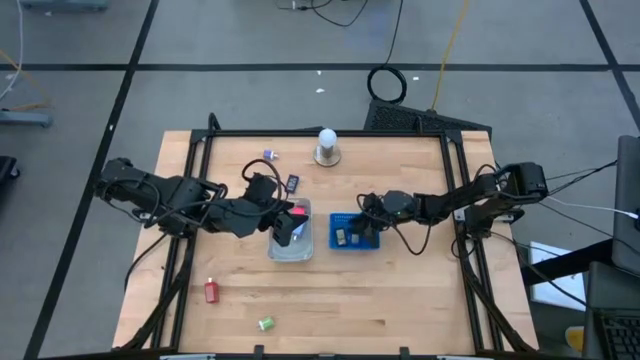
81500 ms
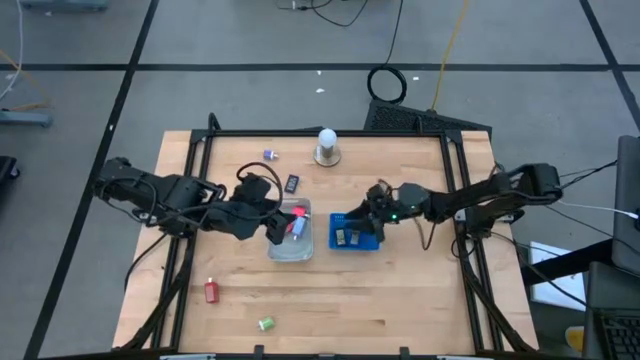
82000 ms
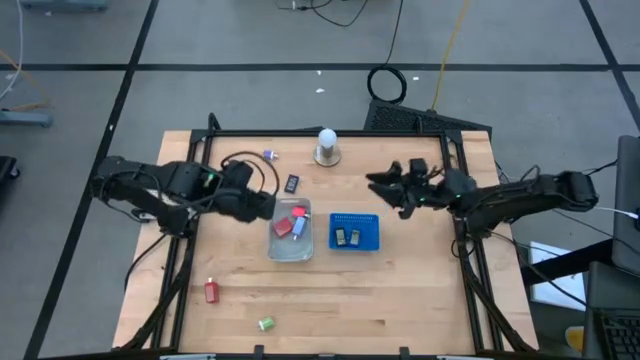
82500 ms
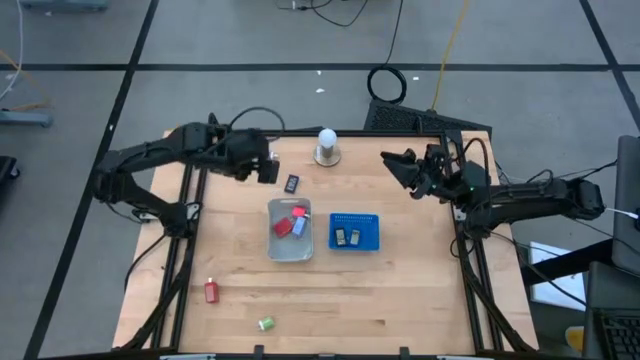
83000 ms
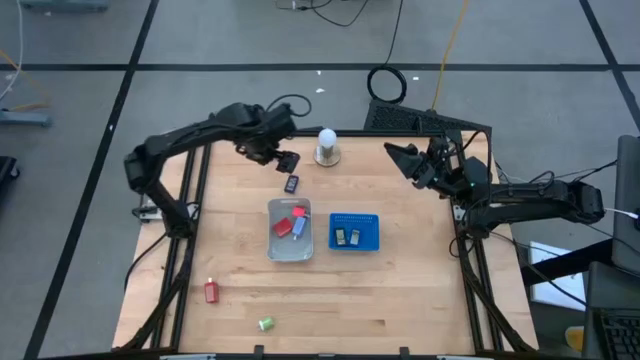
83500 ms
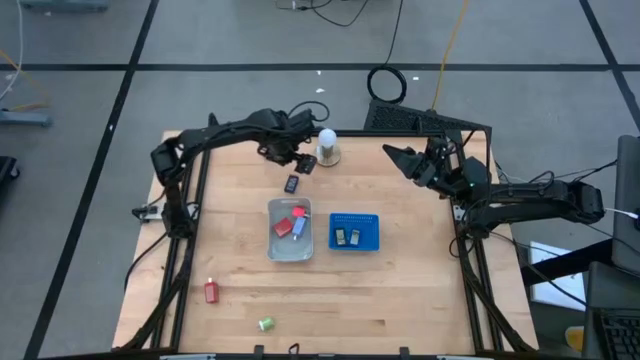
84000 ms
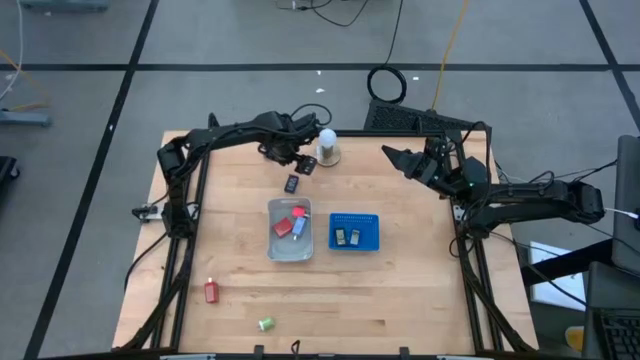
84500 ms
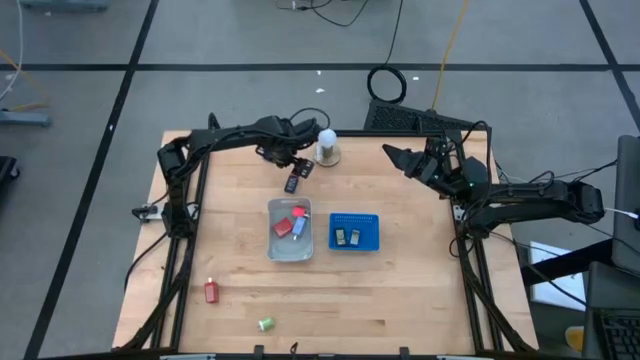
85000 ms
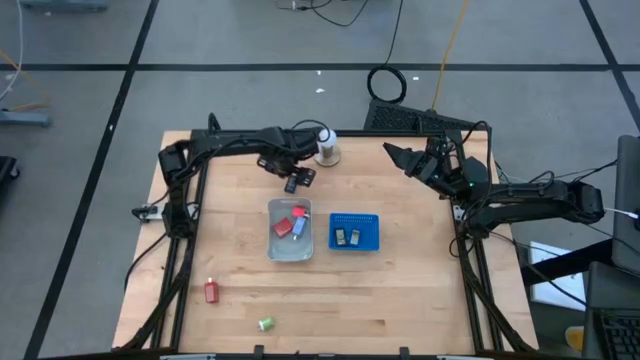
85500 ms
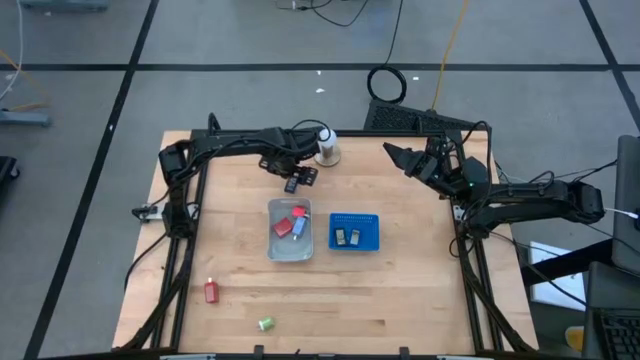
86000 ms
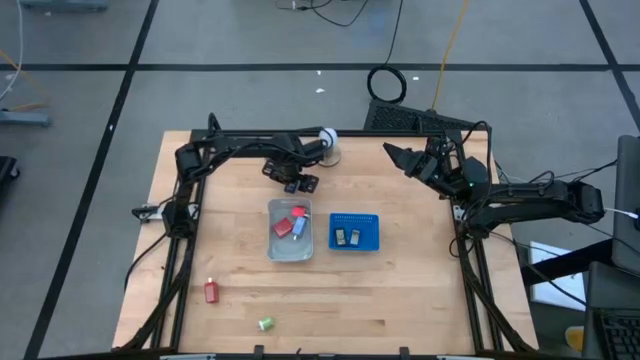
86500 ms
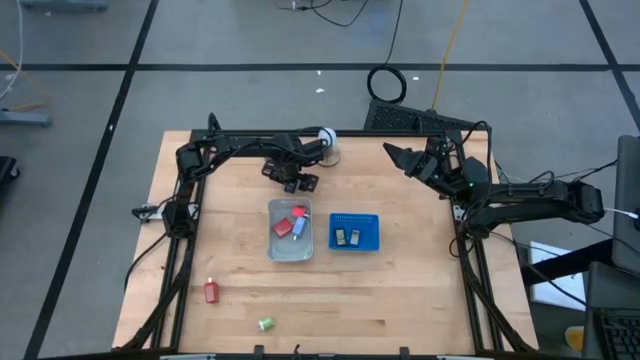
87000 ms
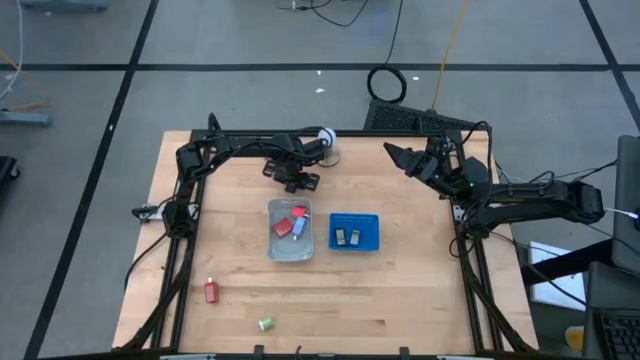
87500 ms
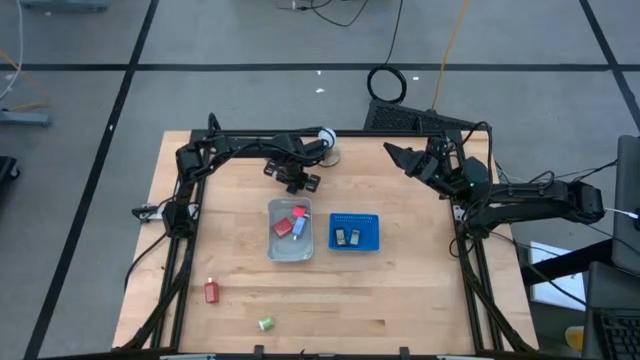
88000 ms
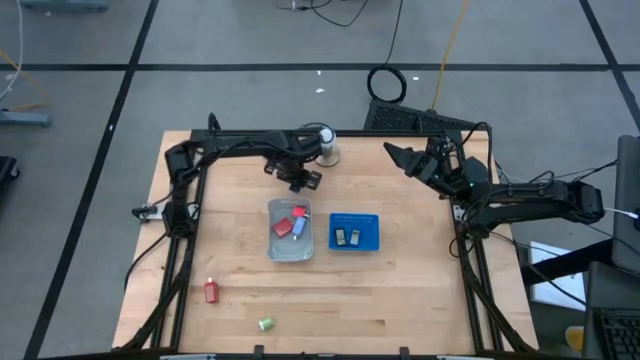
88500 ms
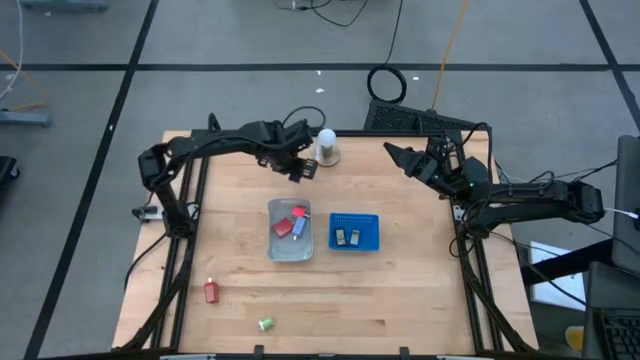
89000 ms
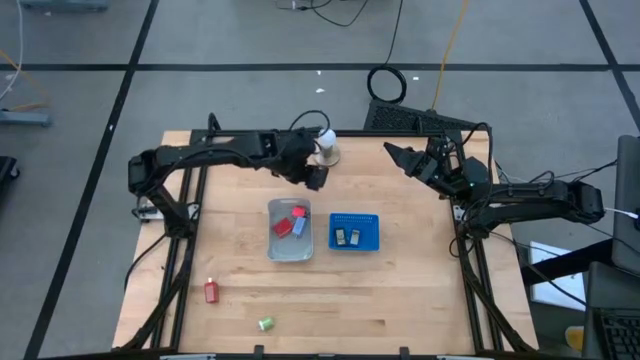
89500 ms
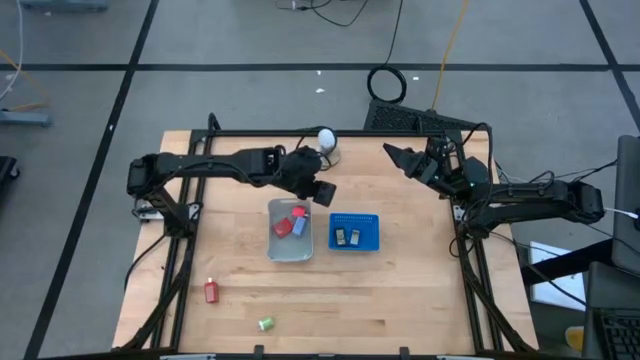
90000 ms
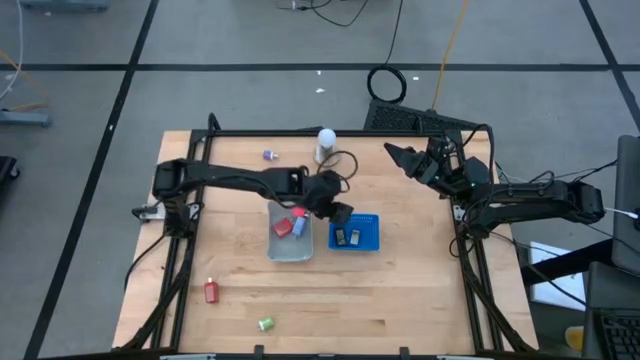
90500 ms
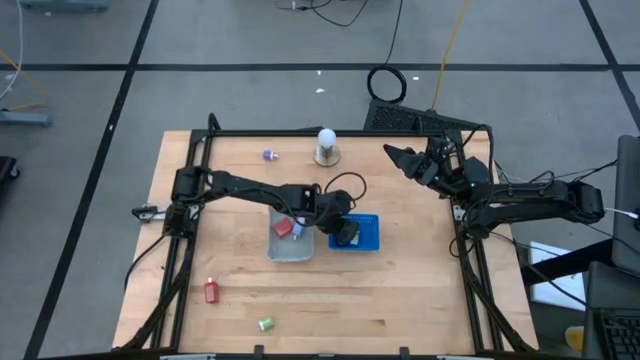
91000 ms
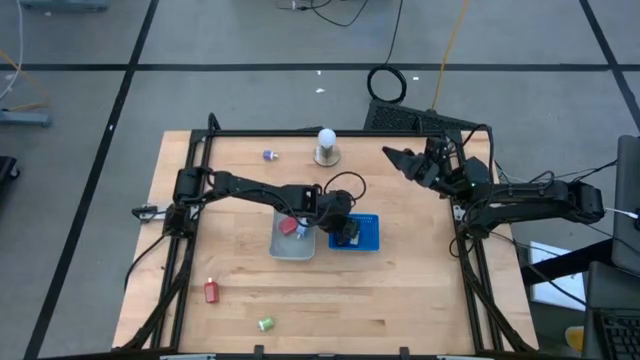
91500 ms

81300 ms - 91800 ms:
Task: Pick & Place Office items
Put the blue digital clock into the blue bin

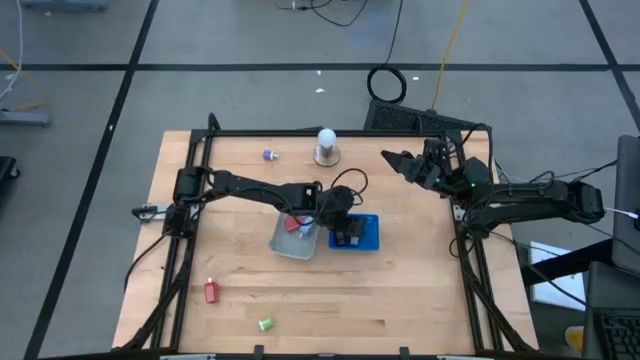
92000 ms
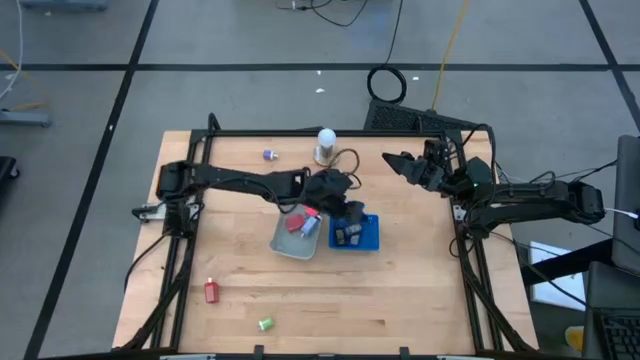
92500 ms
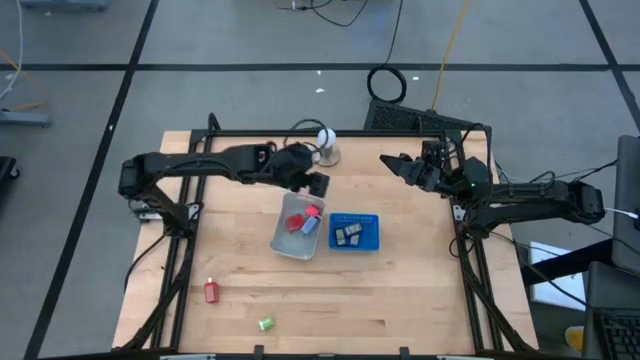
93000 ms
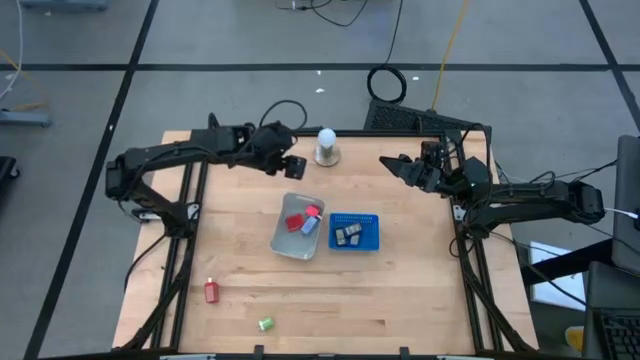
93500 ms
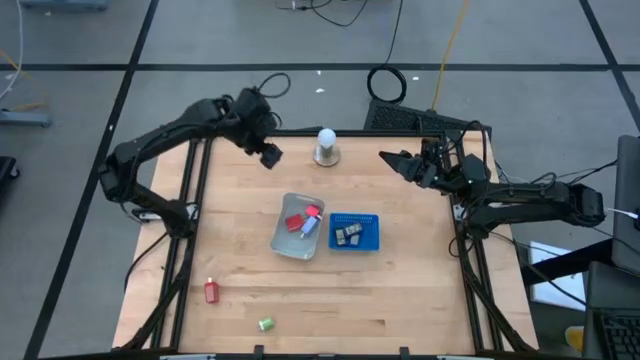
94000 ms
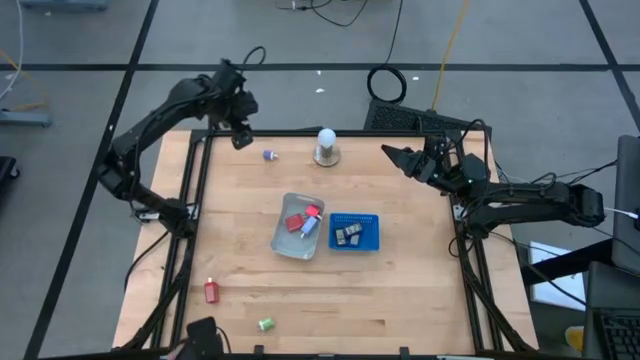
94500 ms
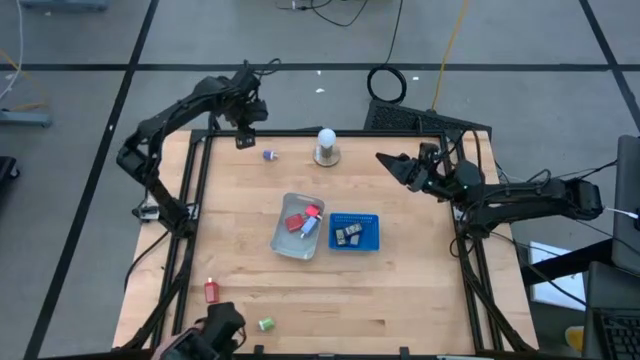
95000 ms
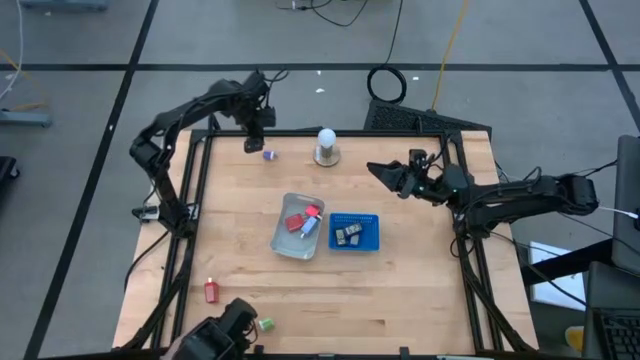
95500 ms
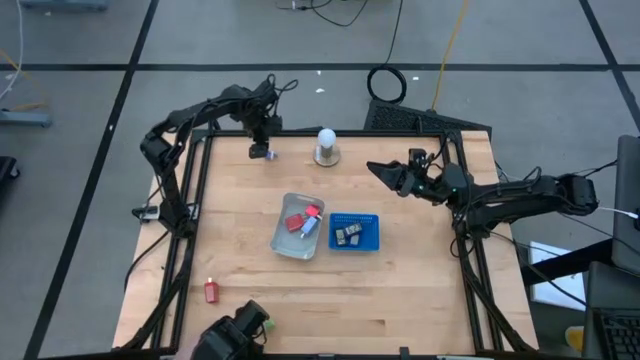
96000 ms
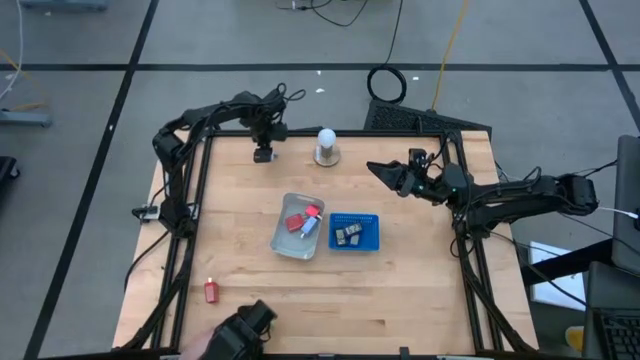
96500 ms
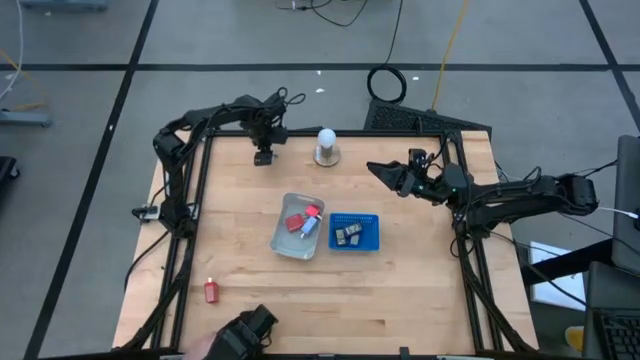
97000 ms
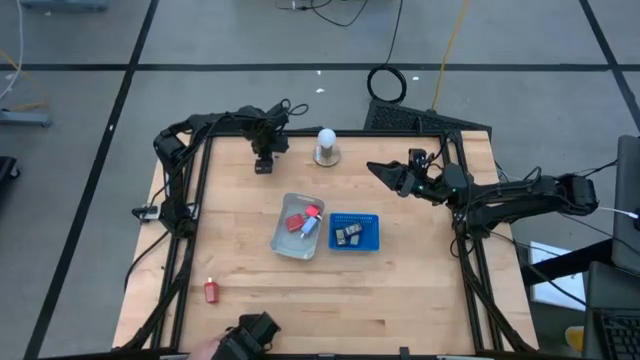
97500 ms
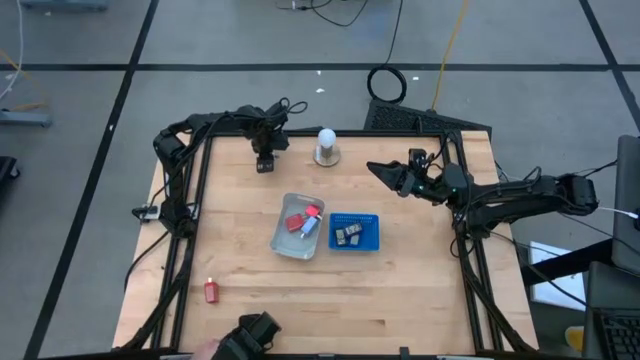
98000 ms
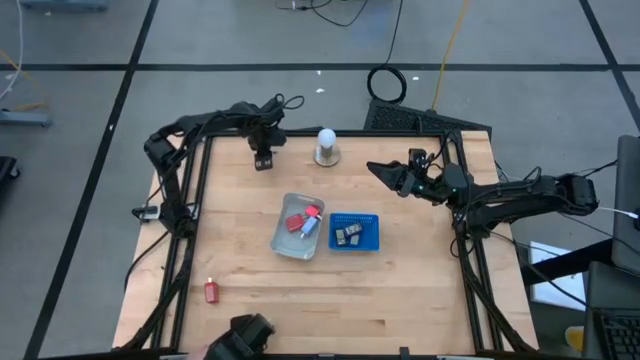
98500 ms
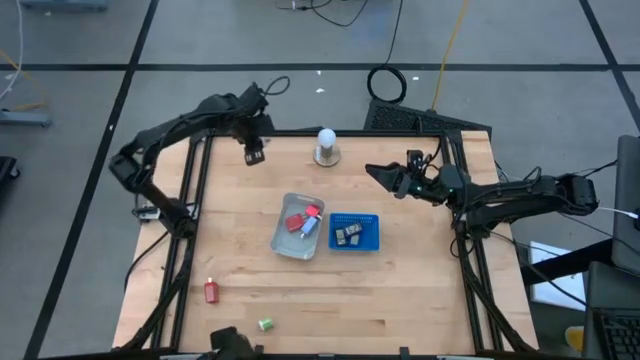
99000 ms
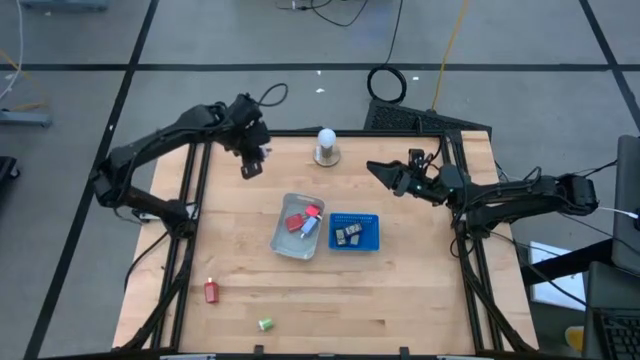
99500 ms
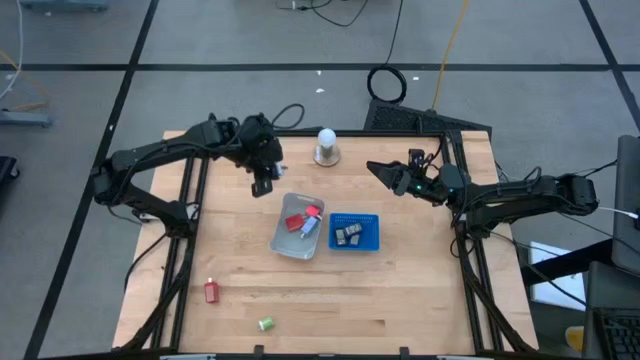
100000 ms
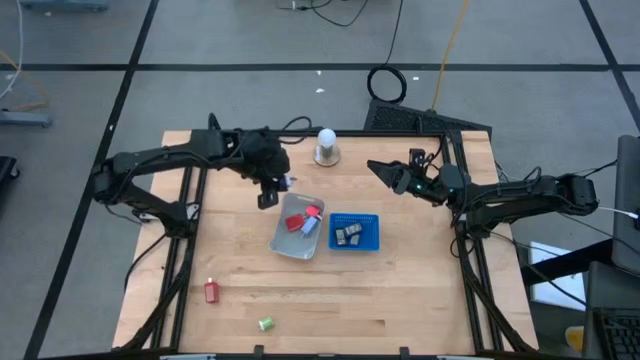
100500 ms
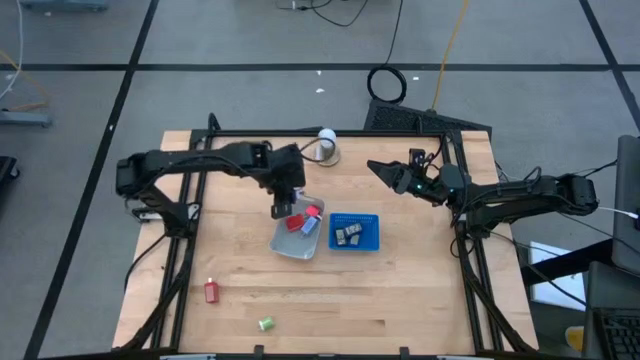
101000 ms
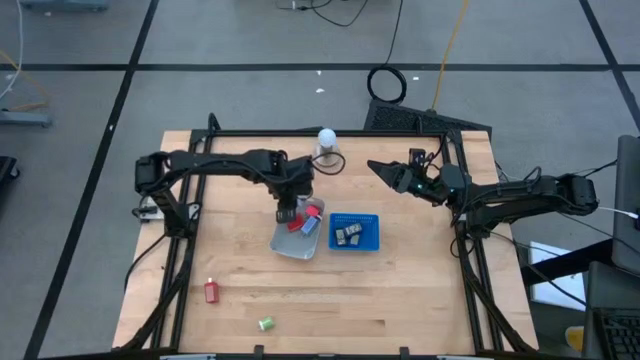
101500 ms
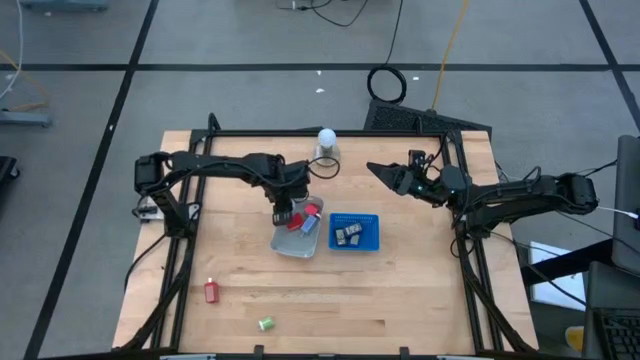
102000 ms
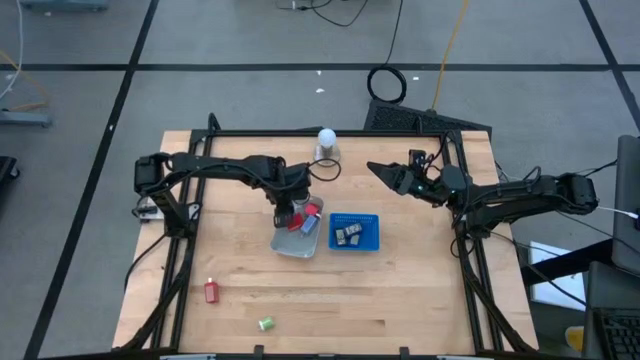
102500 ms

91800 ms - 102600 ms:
Put the violet charger adapter into the gray bin

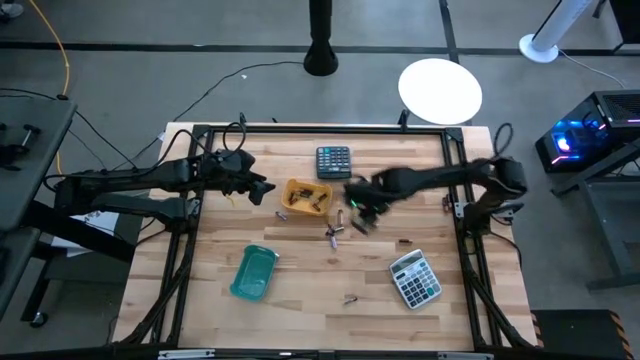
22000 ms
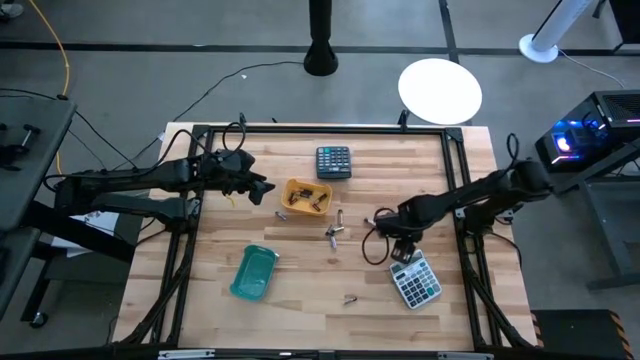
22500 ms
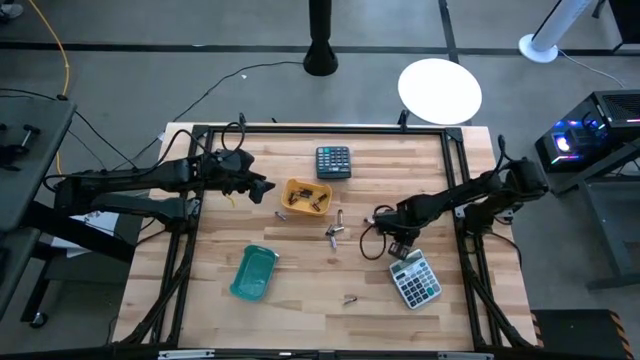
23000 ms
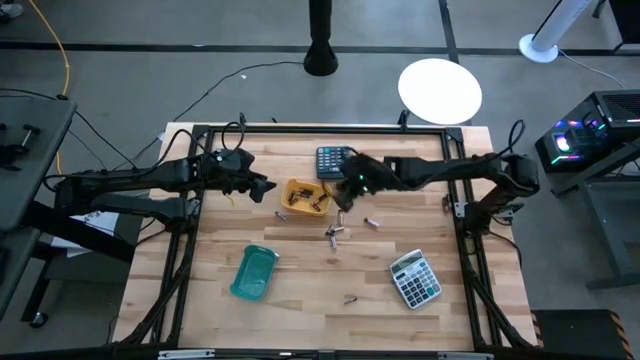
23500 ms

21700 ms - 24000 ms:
Task: Sort batteries
Put the black battery into the yellow bin
